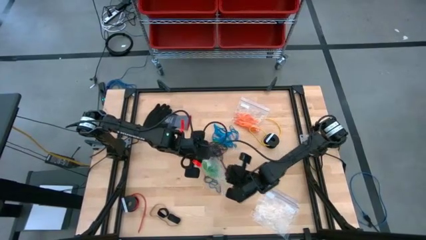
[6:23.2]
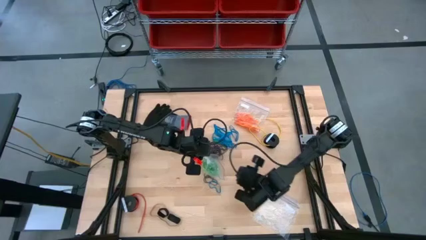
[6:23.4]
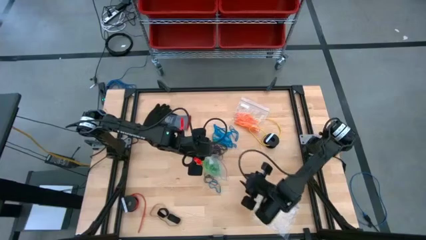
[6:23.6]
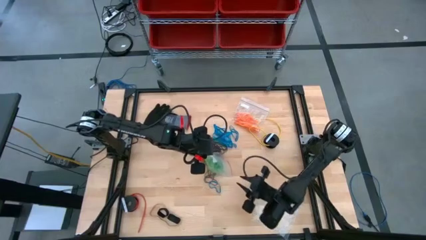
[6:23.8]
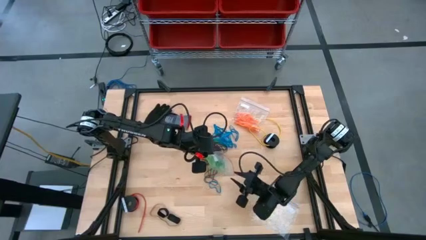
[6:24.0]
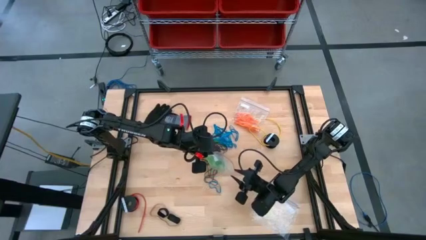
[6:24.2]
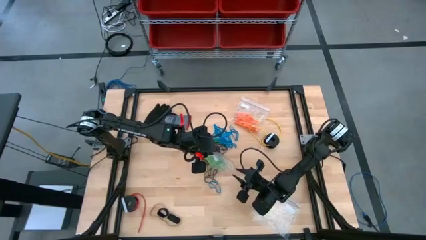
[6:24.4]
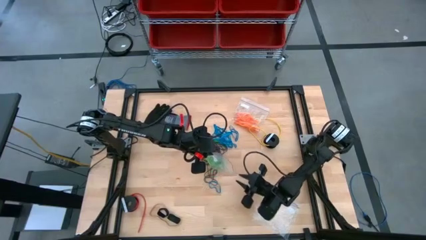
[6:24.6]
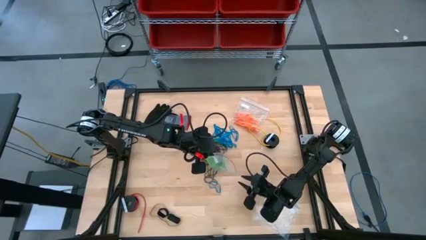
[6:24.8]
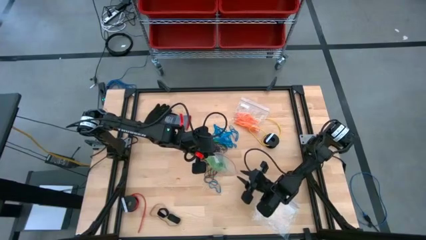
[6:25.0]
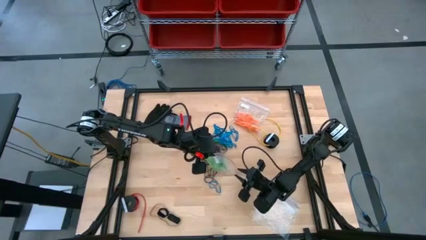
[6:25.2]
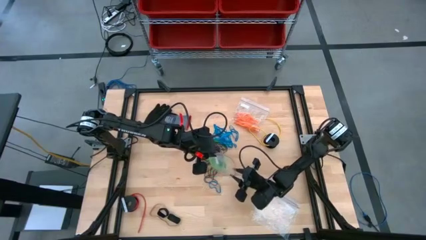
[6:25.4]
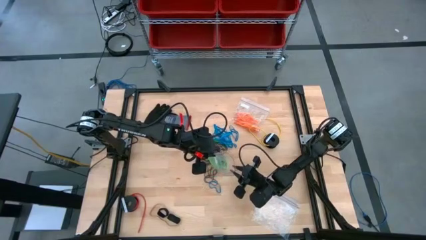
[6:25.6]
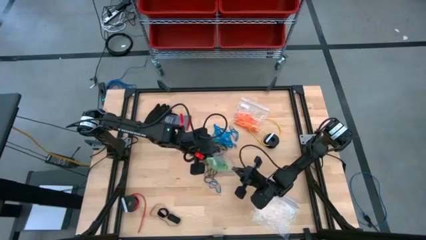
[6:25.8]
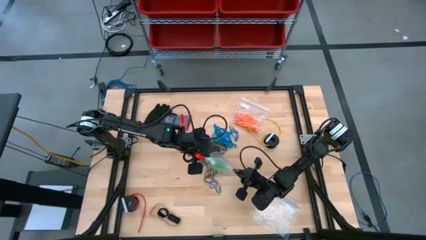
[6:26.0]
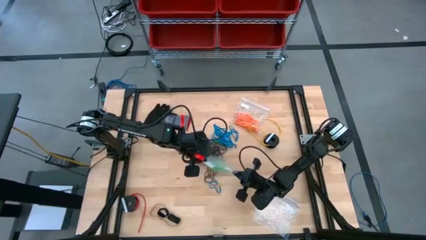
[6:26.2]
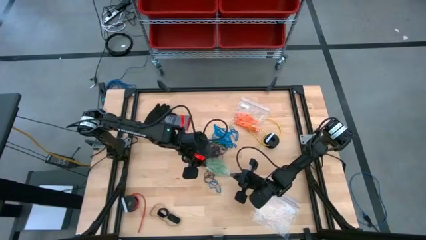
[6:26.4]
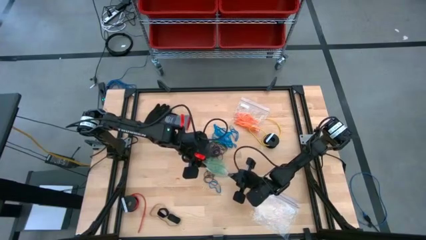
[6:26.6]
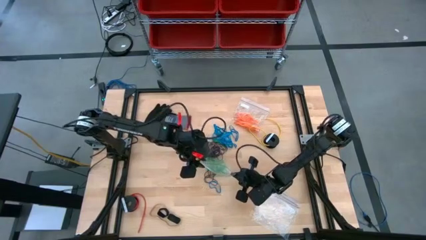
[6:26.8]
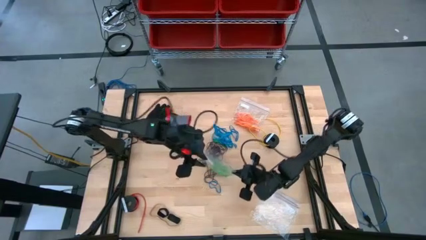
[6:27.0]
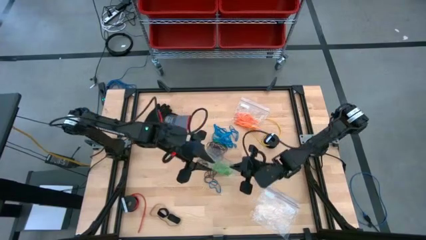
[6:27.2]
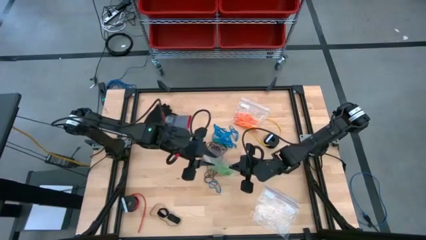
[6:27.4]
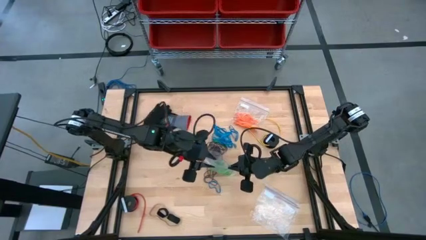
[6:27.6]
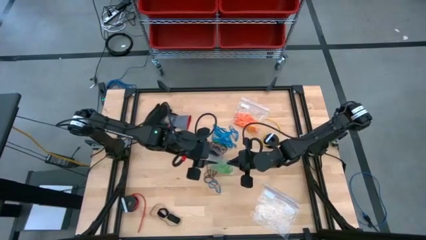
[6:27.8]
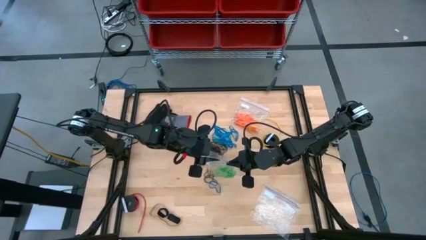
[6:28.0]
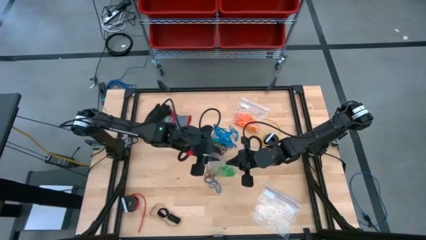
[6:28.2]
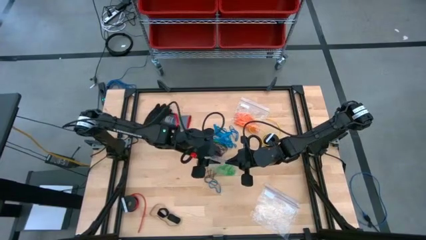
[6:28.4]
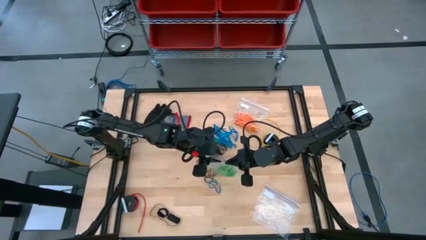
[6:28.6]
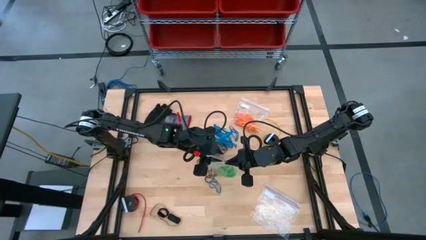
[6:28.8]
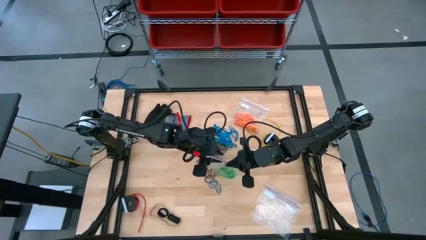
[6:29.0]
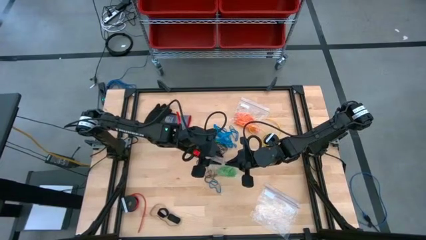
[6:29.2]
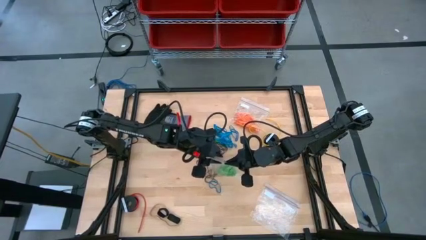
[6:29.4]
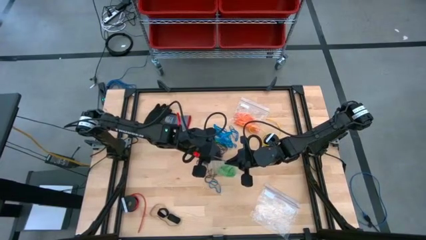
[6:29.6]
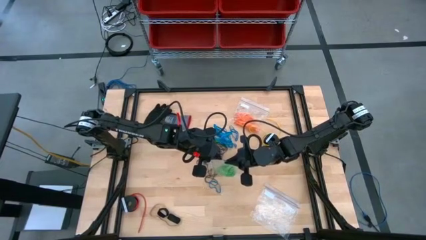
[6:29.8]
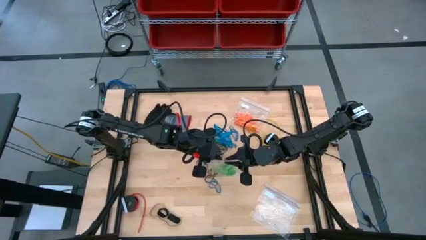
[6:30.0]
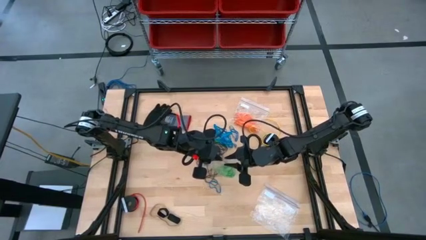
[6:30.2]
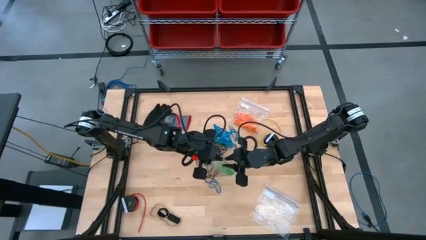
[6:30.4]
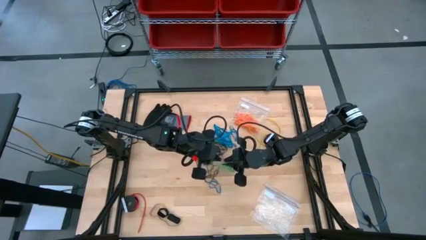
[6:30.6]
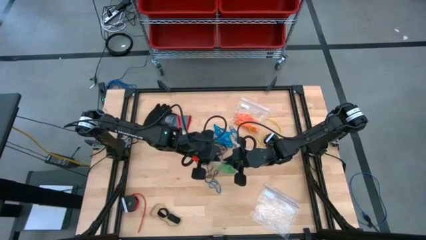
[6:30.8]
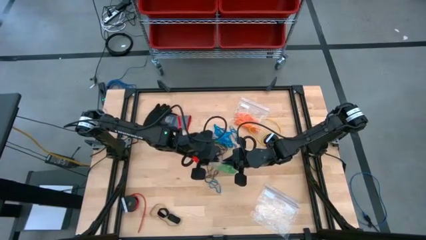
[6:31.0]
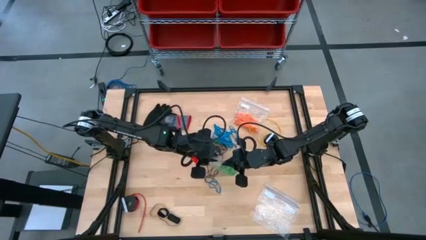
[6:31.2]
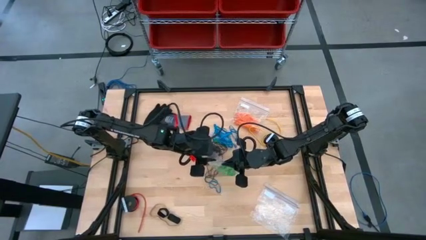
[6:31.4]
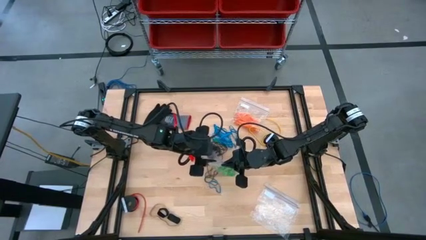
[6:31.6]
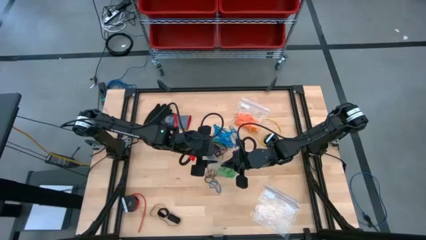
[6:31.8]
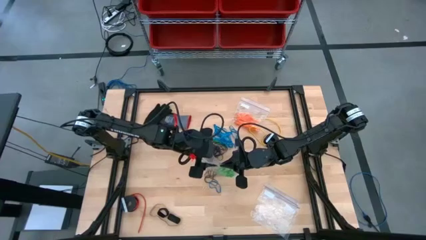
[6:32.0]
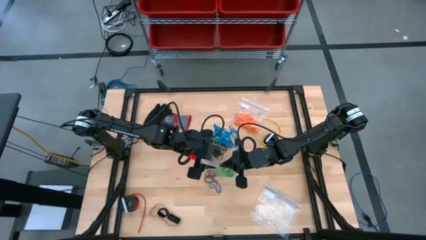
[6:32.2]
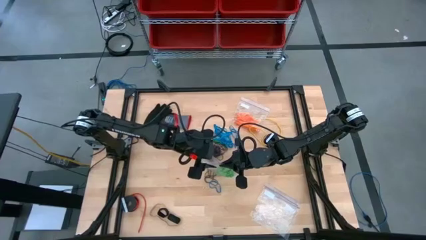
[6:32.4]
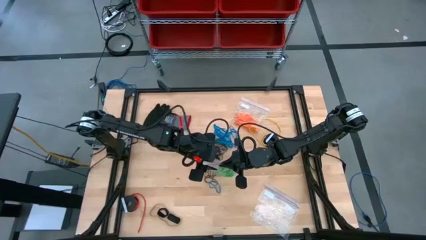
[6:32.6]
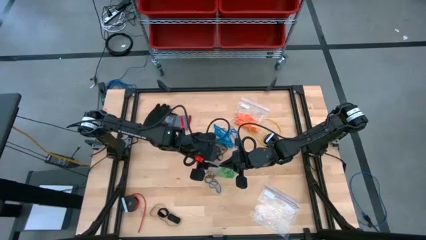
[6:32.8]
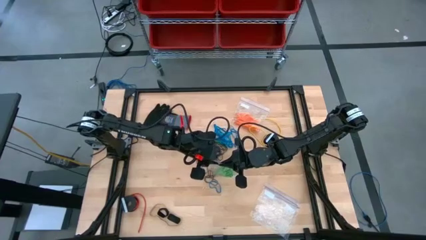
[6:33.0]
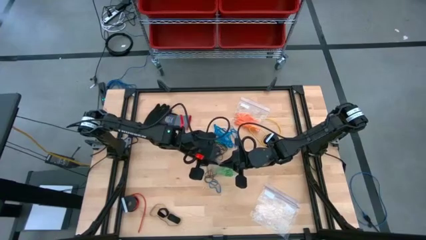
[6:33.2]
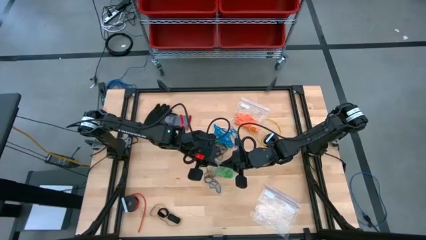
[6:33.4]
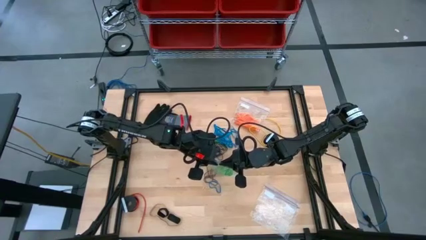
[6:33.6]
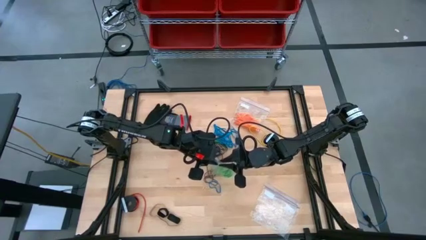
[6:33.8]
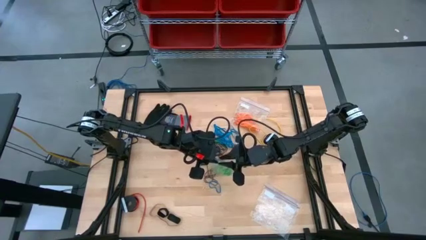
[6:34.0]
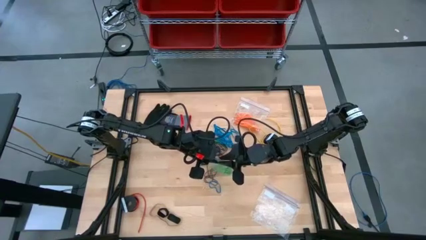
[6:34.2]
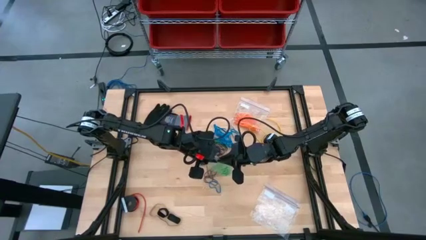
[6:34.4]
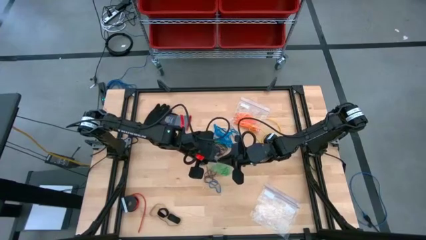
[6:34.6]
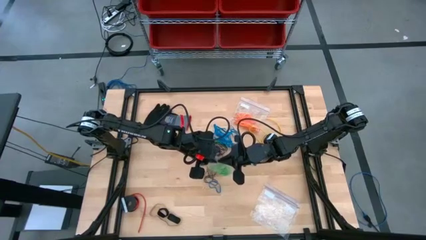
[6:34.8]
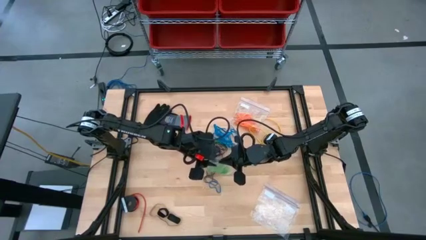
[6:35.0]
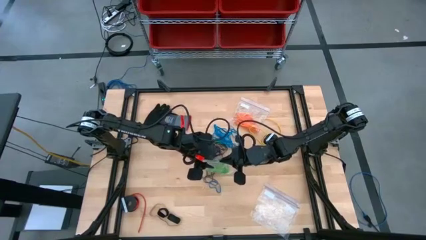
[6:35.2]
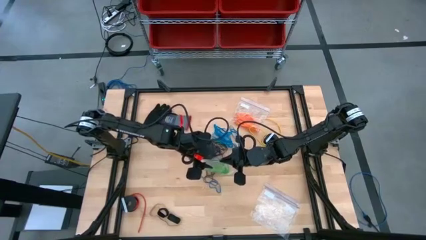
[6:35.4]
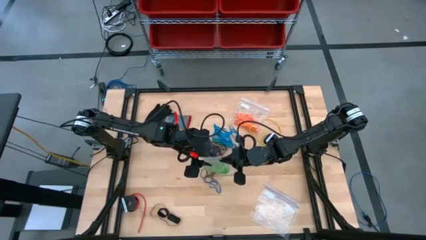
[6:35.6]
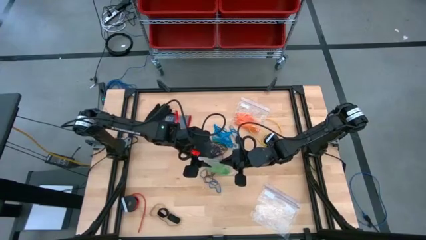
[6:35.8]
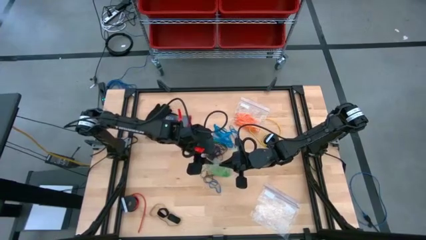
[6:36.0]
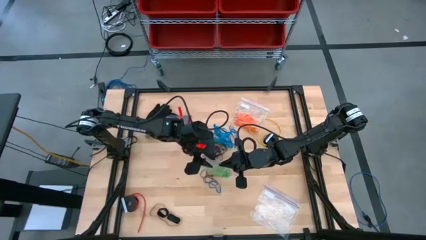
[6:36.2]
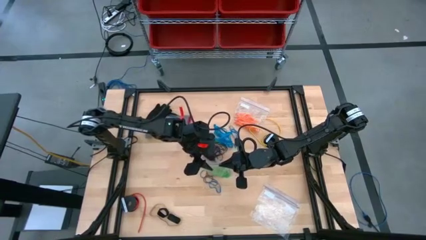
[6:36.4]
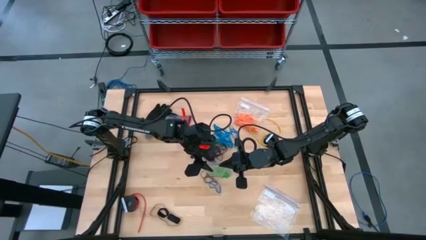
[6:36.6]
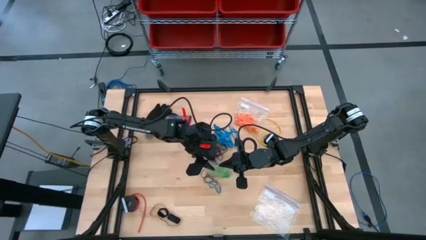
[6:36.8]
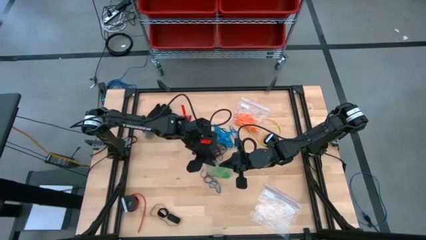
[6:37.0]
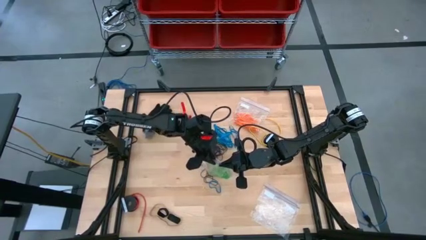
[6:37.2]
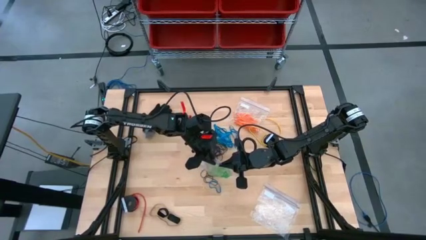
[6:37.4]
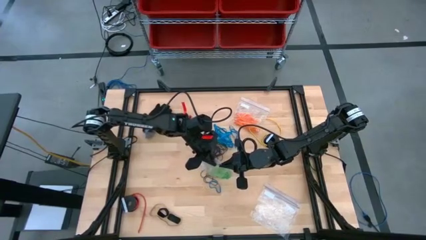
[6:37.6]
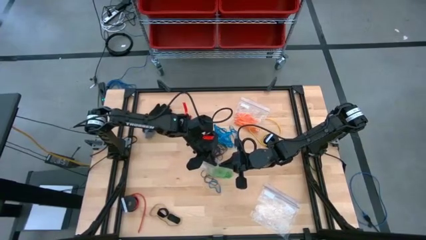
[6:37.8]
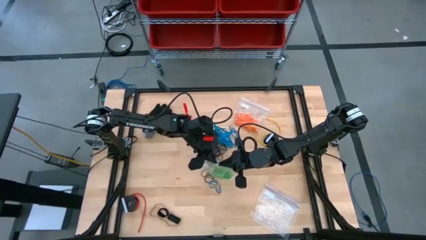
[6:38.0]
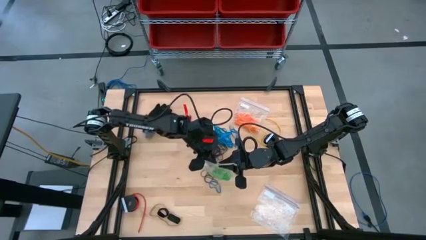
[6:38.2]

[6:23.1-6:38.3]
Task: Sort rubber bands
Close the transparent zip bag

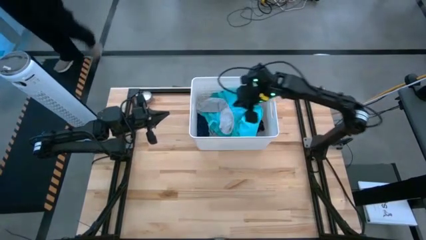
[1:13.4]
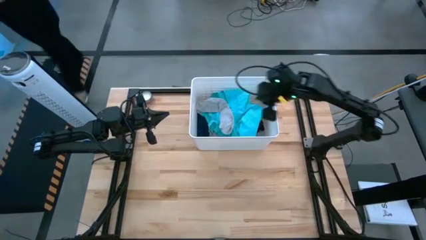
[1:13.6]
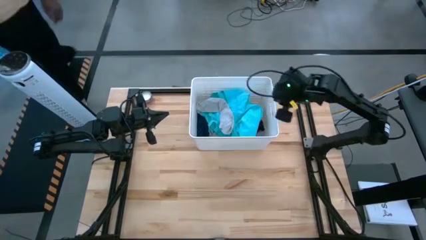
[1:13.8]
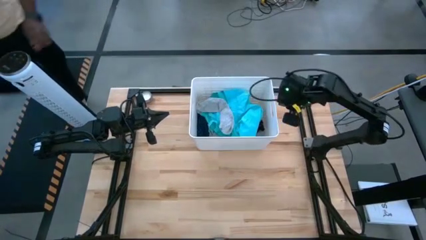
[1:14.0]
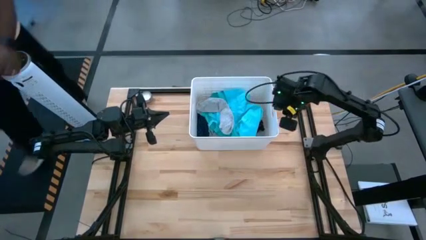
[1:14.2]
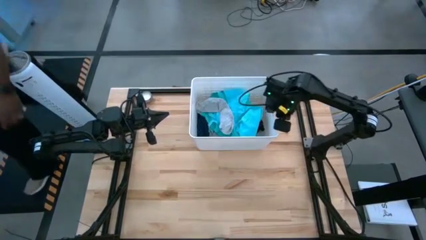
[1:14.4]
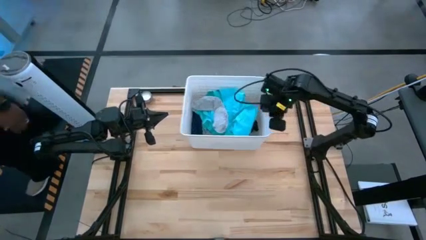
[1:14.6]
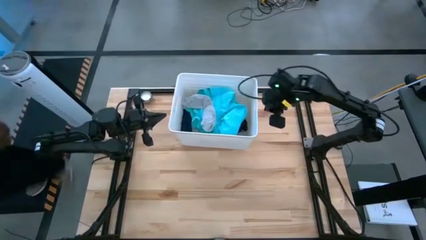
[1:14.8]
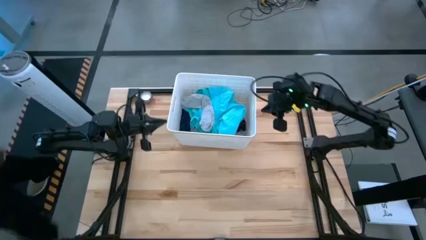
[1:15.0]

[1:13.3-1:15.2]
Task: Sort clothes
Adjust the laundry bin
